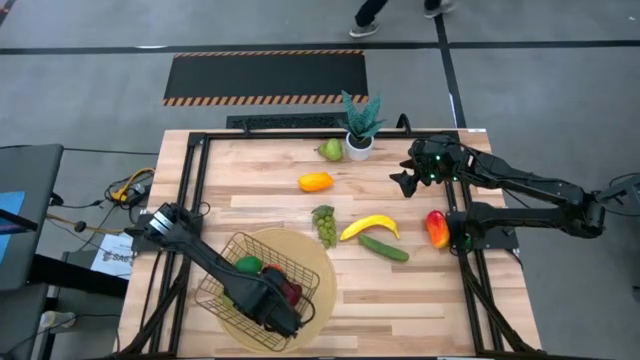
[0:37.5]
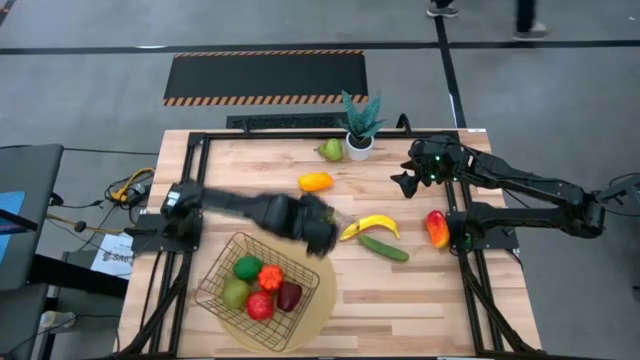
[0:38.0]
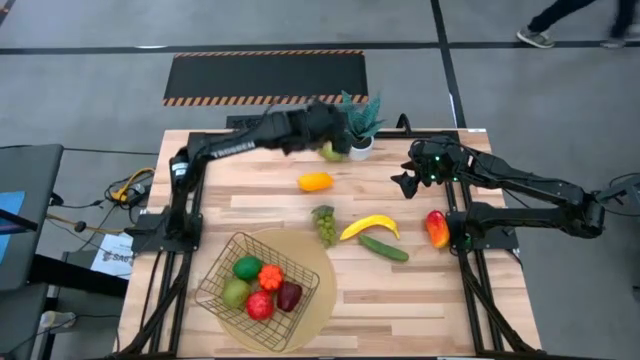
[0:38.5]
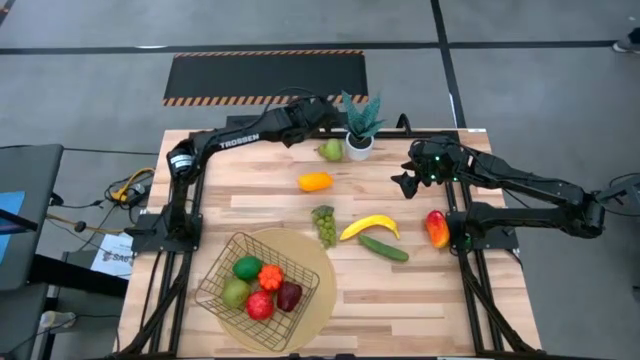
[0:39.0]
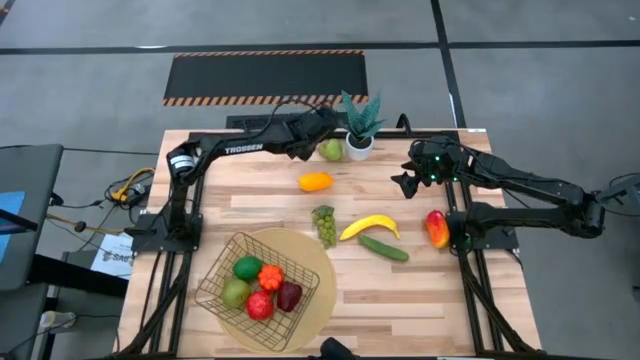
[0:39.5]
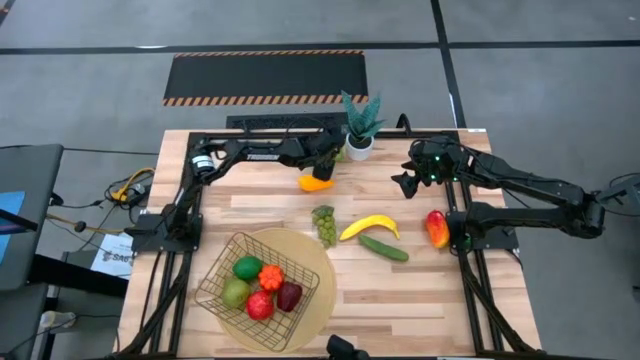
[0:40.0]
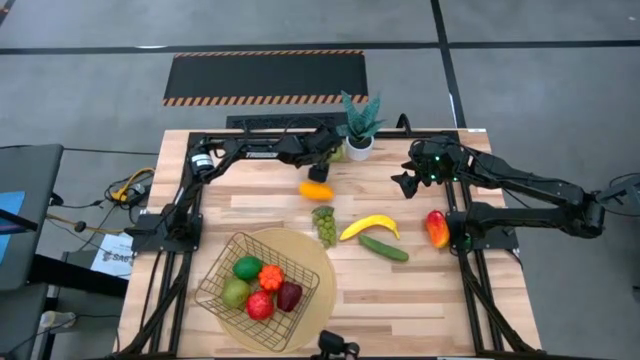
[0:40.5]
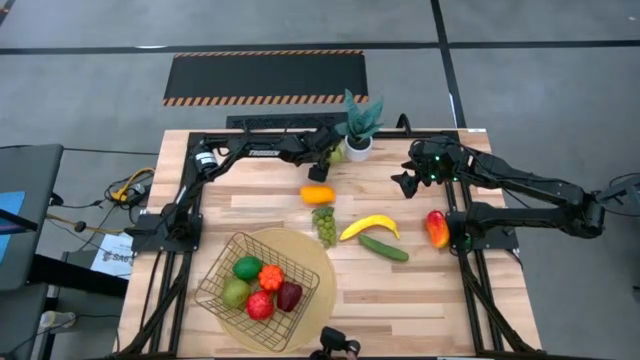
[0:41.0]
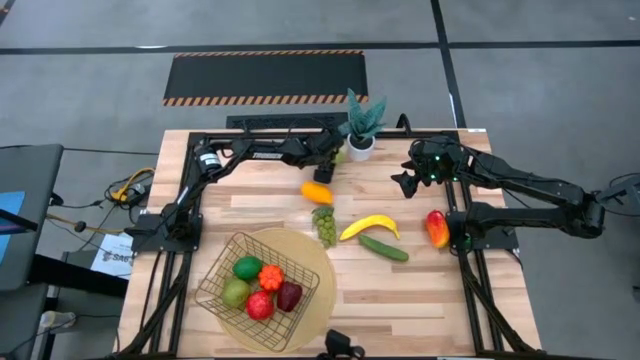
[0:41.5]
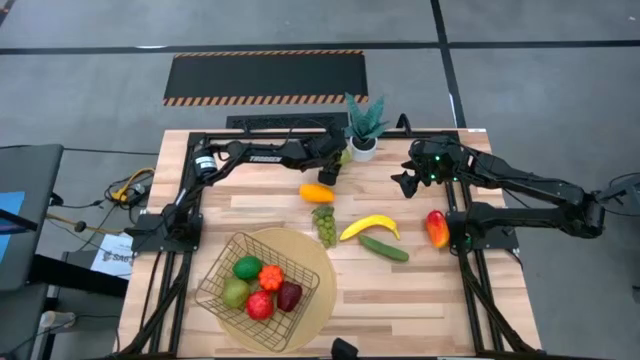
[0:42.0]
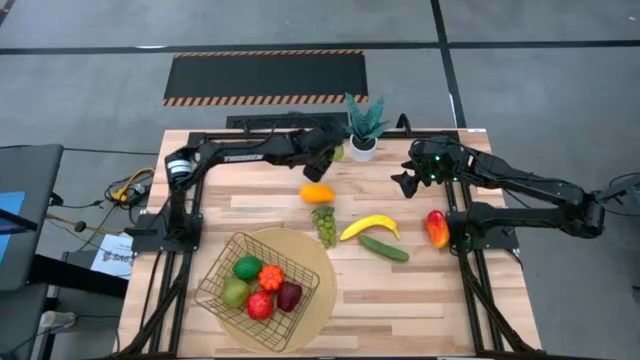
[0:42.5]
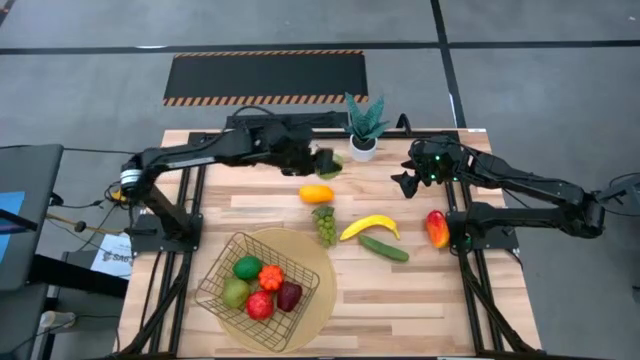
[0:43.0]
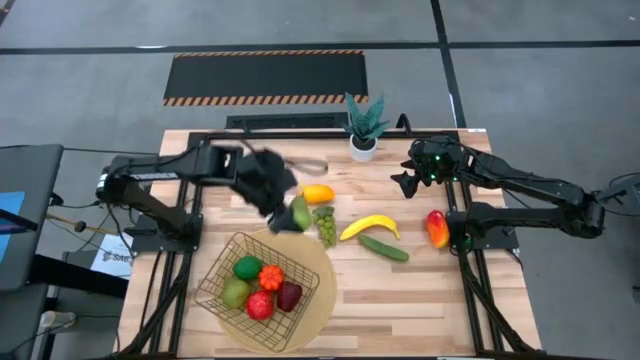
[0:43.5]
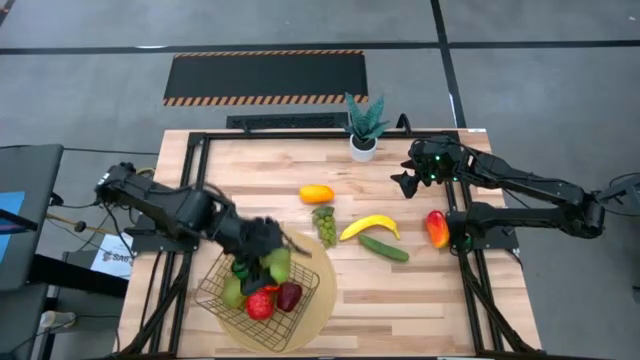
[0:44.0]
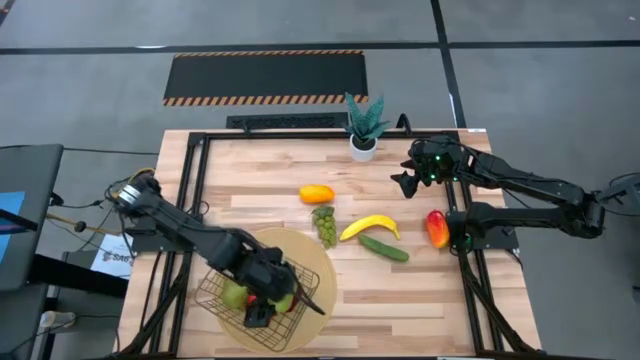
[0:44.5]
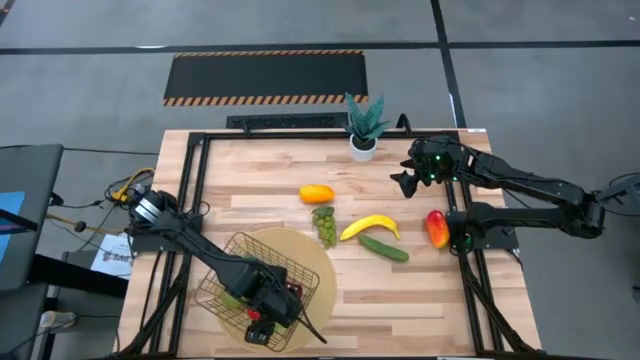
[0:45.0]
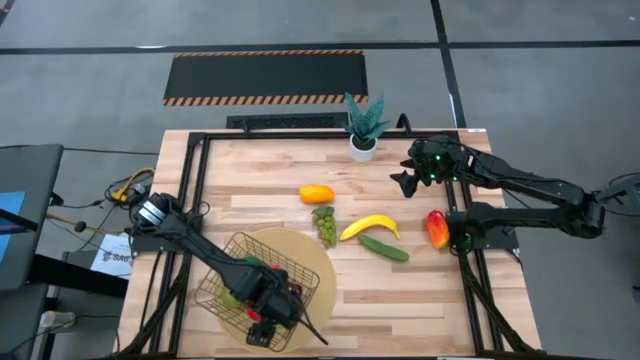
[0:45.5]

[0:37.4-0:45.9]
Task: Build produce basket
Put the pear into the mesh basket

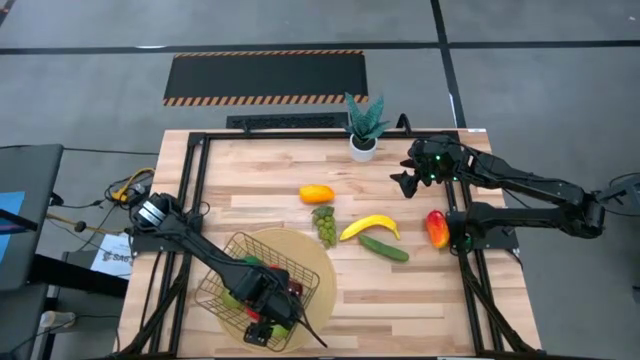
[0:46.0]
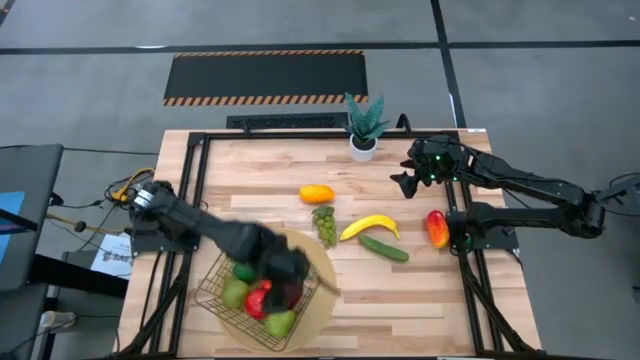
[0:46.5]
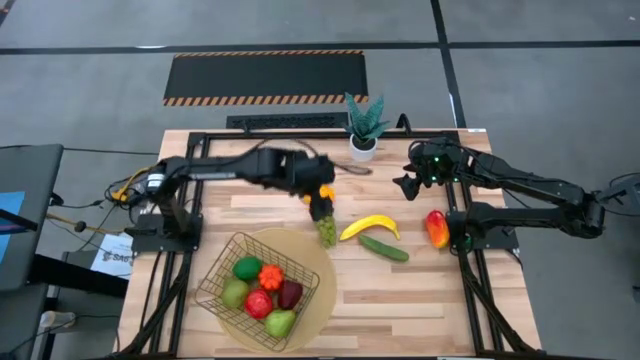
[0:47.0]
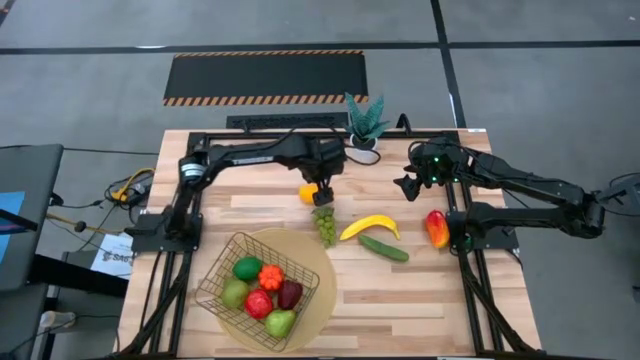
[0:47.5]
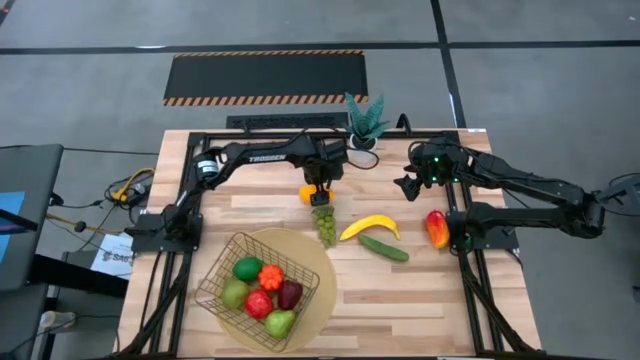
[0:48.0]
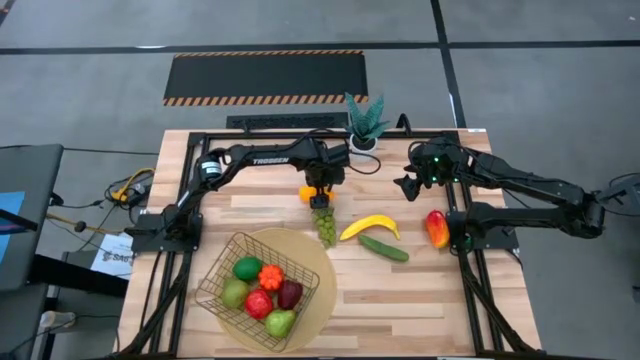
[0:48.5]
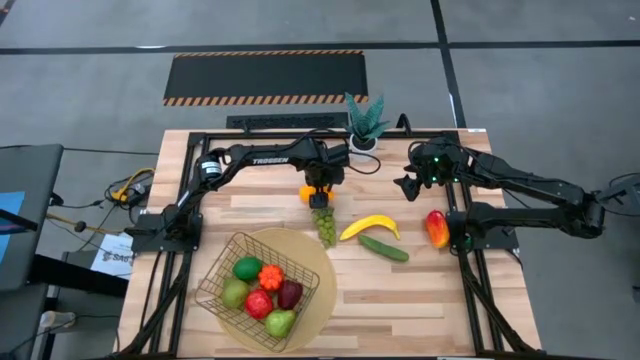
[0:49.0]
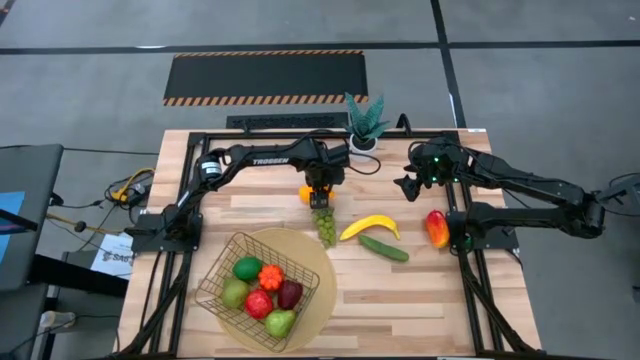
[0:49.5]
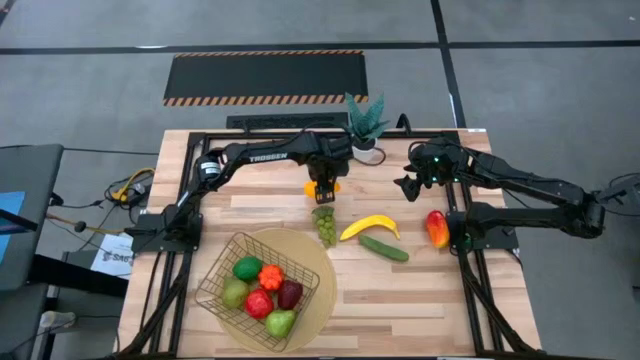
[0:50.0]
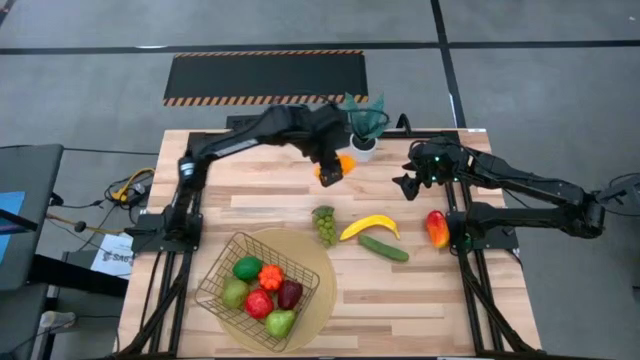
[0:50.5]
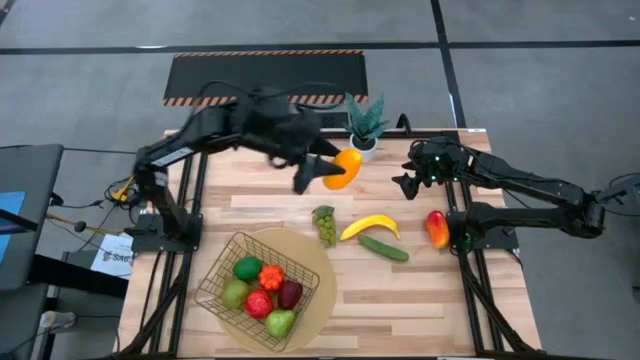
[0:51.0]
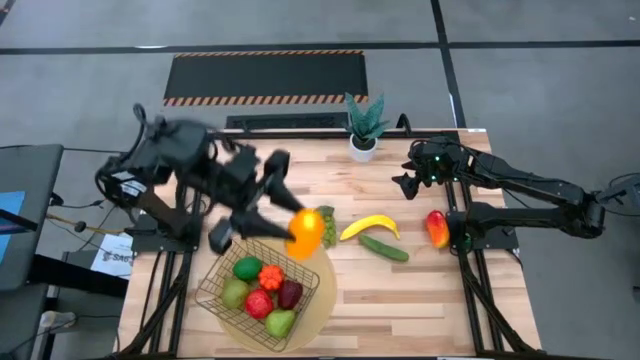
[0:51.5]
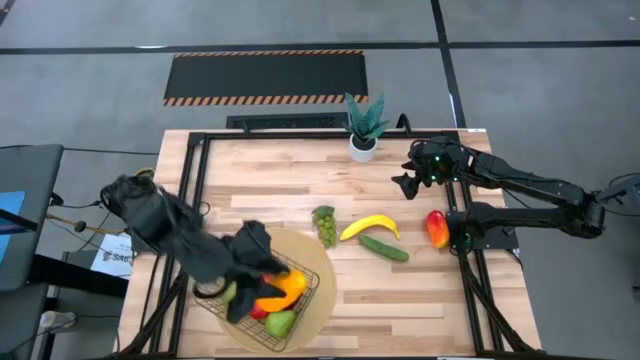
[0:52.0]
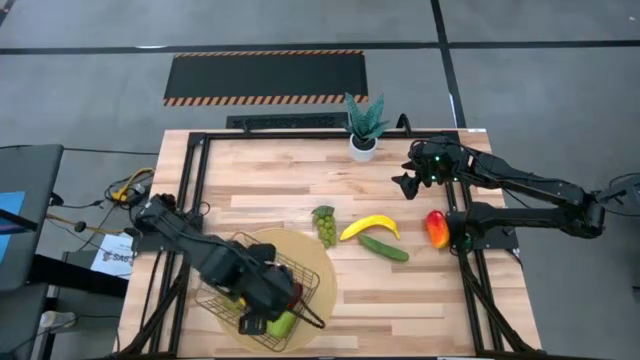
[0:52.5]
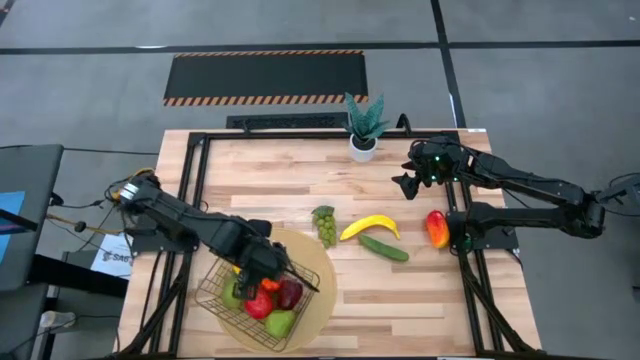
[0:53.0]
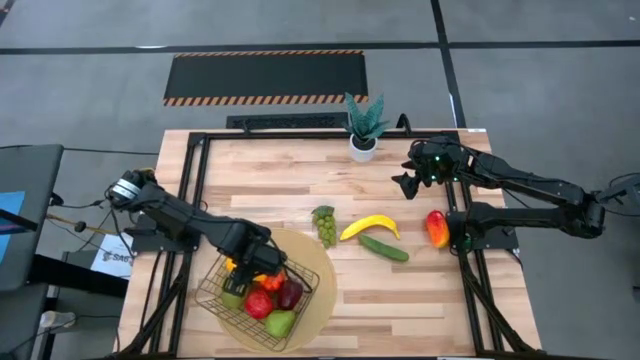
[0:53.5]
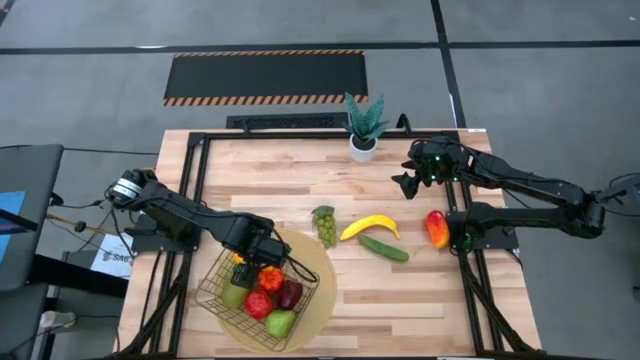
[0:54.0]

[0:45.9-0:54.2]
Put yellow mango into the mesh basket

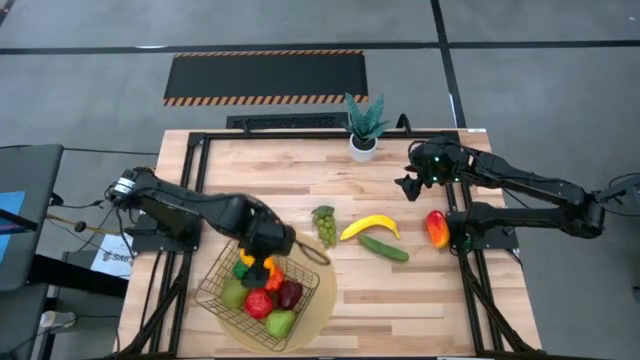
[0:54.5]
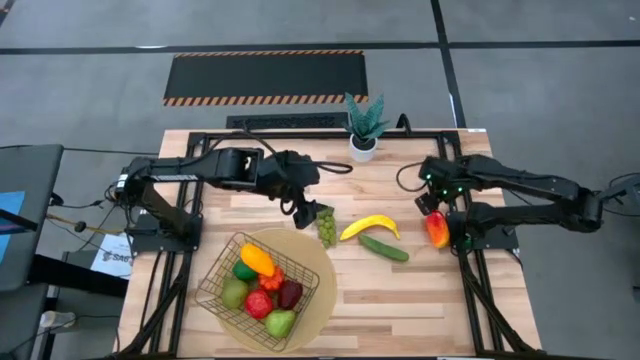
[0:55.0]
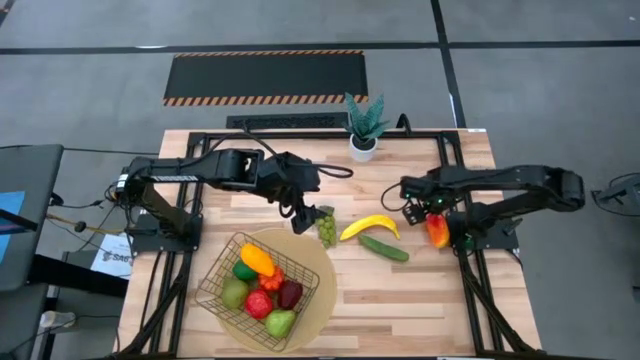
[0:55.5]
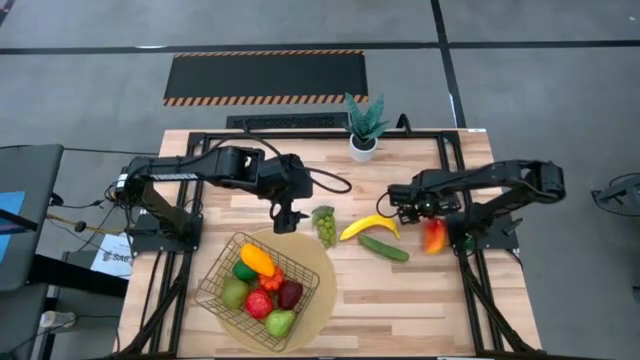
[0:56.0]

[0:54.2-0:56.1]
Put the red mango into the mesh basket

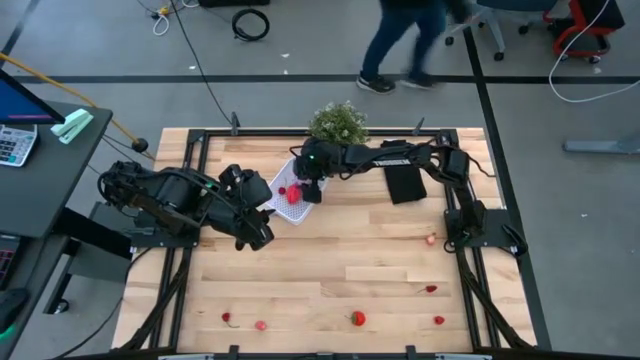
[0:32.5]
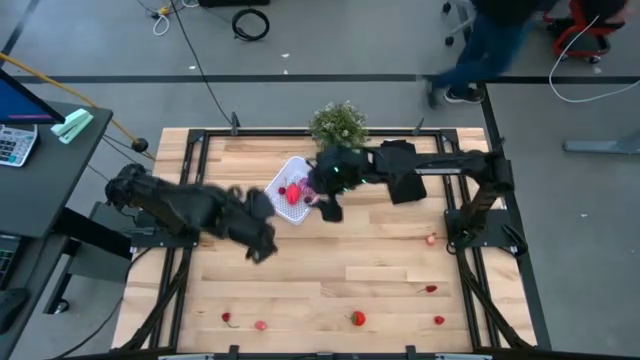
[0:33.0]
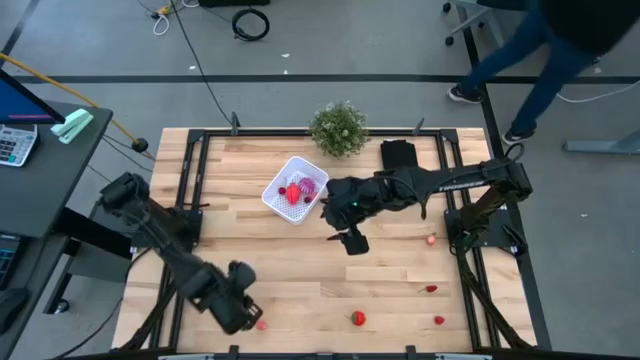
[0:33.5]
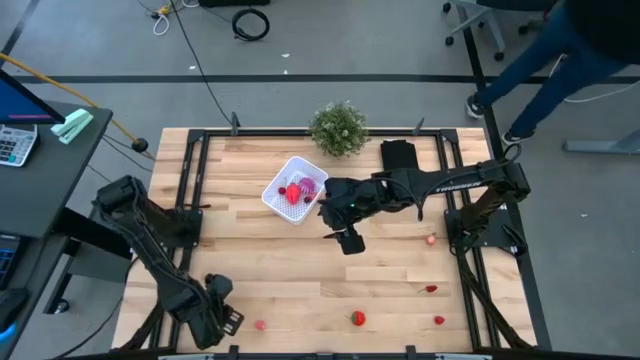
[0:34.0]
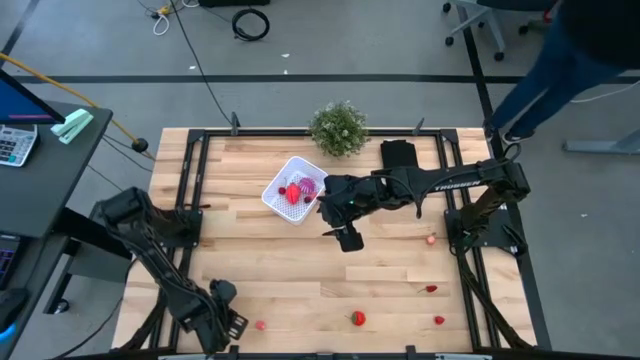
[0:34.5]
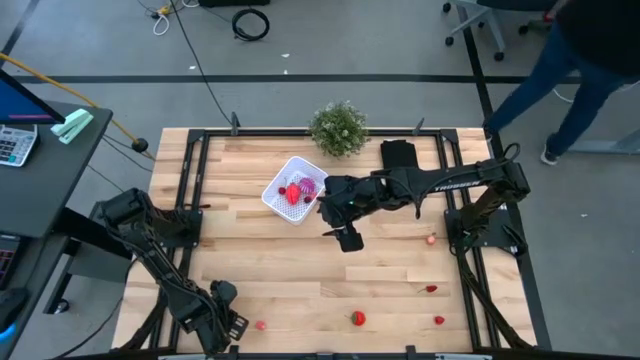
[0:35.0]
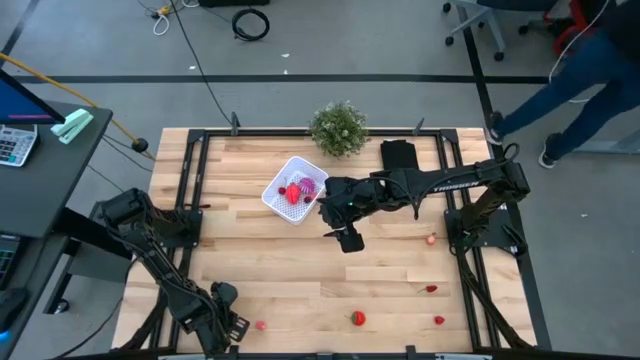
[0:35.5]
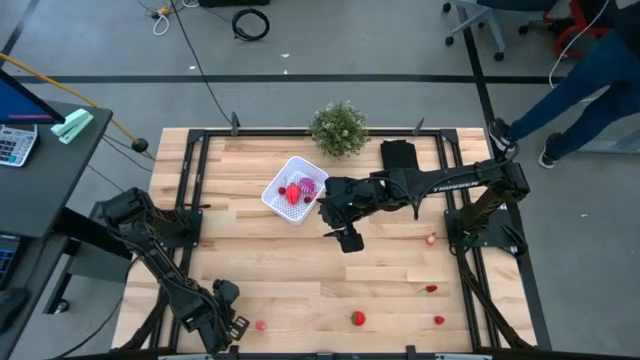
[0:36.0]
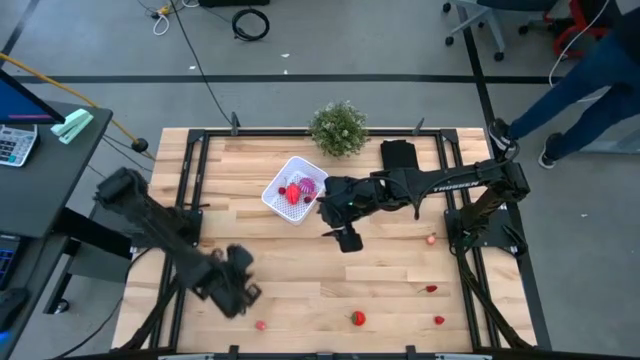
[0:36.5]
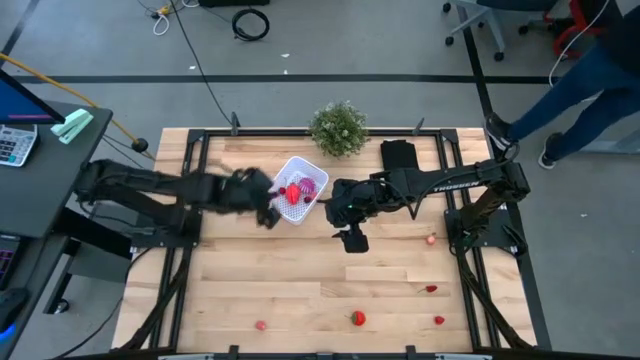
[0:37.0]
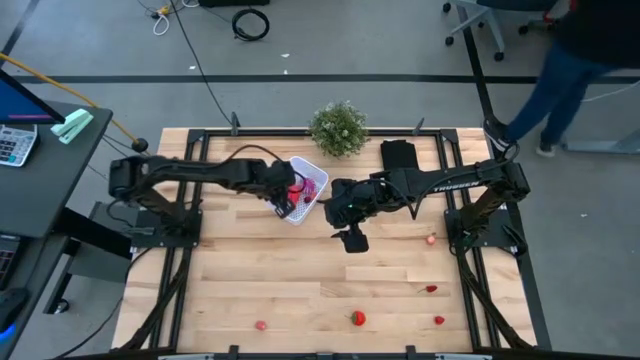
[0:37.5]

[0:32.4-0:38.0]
Task: Pick and placing Produce into tupperware
Put the red cherry into the white basket
